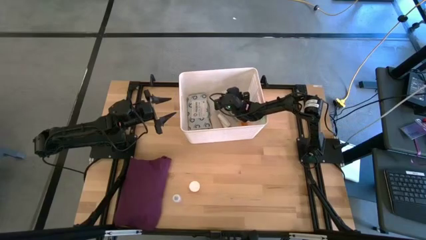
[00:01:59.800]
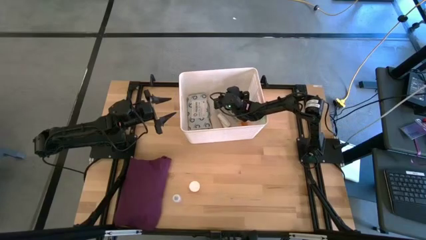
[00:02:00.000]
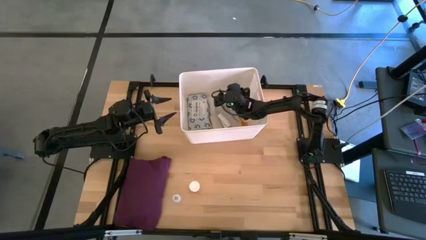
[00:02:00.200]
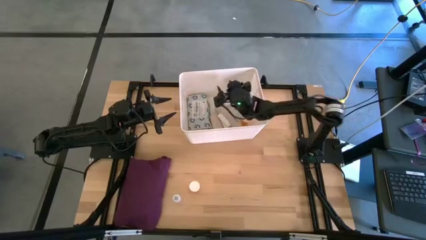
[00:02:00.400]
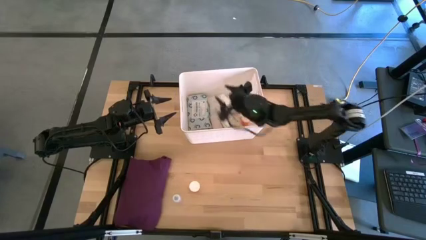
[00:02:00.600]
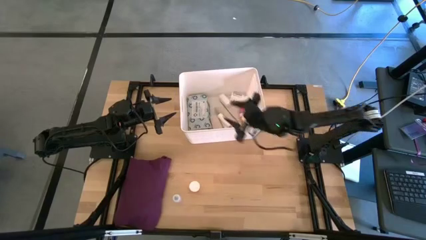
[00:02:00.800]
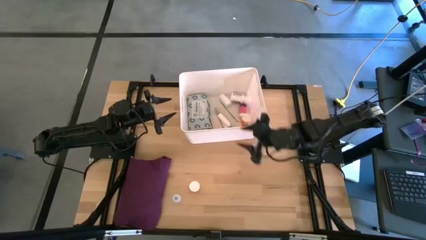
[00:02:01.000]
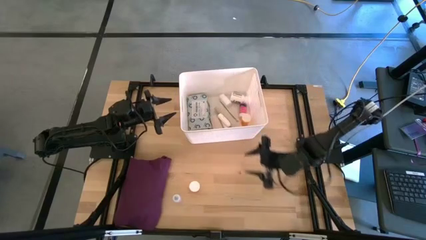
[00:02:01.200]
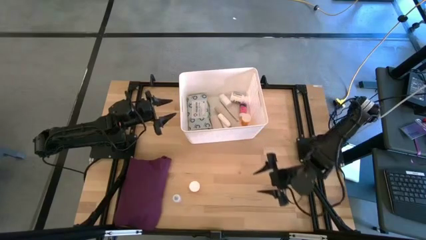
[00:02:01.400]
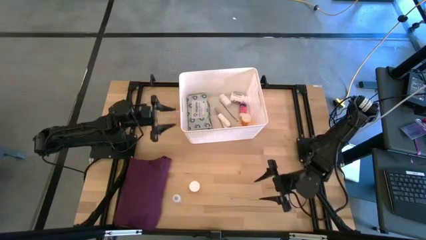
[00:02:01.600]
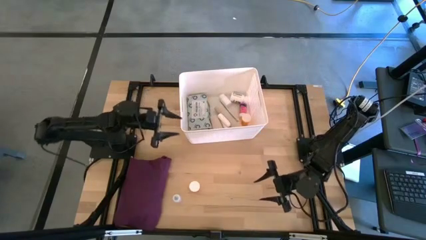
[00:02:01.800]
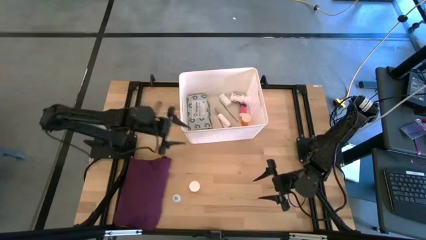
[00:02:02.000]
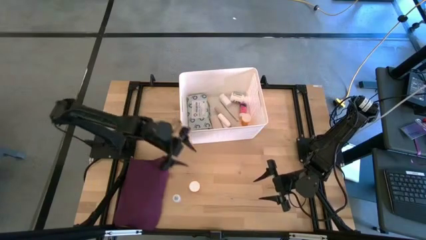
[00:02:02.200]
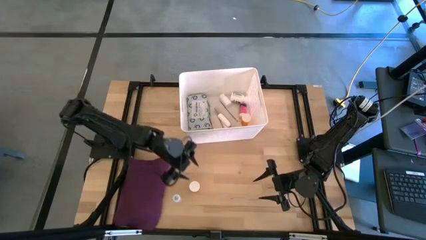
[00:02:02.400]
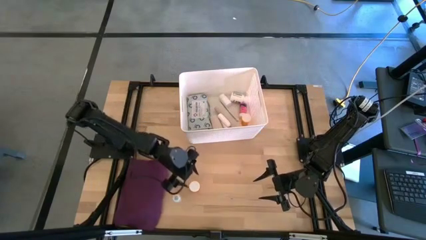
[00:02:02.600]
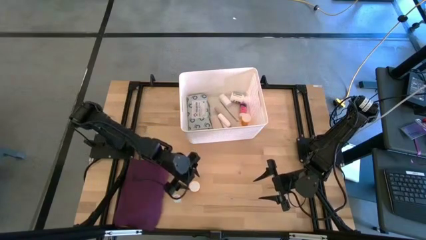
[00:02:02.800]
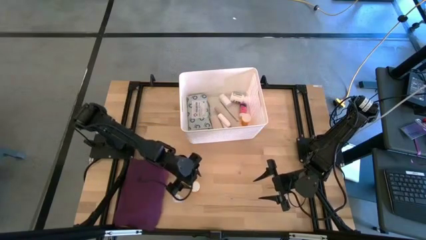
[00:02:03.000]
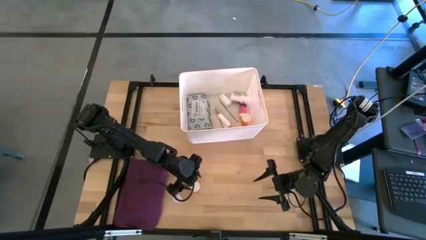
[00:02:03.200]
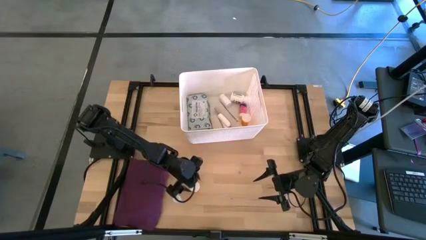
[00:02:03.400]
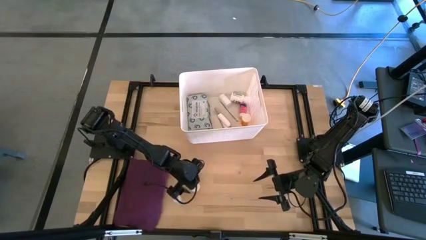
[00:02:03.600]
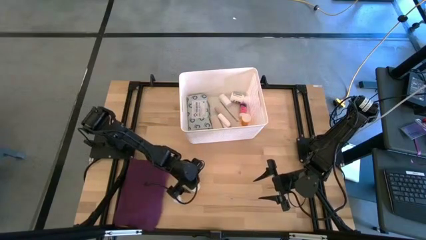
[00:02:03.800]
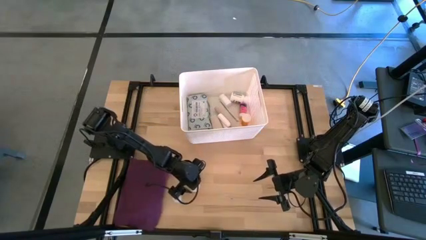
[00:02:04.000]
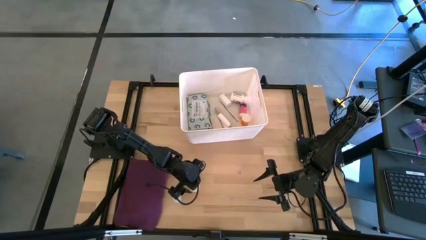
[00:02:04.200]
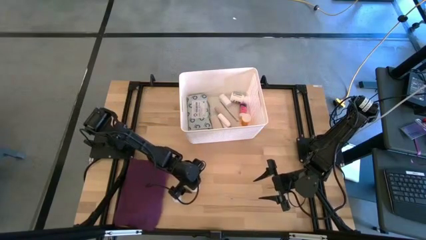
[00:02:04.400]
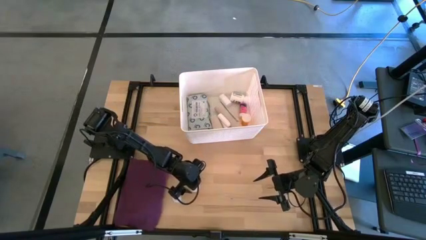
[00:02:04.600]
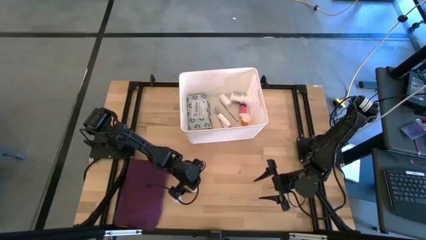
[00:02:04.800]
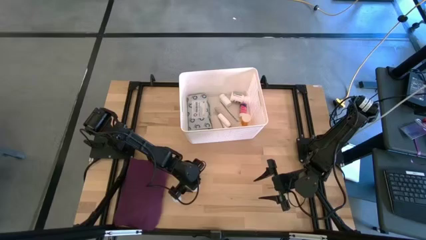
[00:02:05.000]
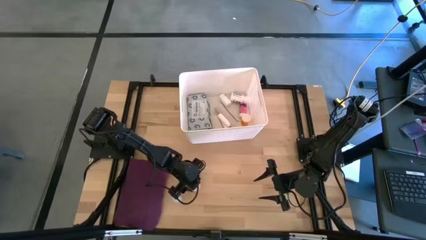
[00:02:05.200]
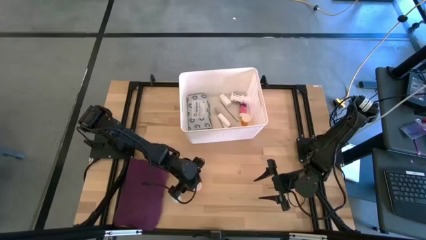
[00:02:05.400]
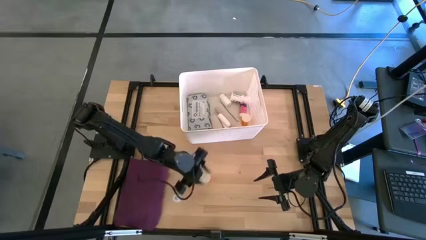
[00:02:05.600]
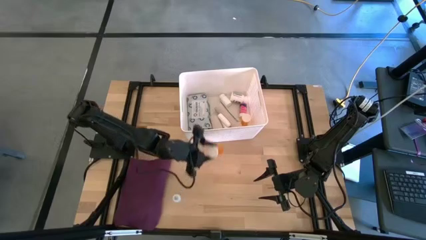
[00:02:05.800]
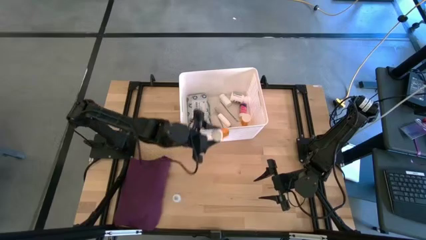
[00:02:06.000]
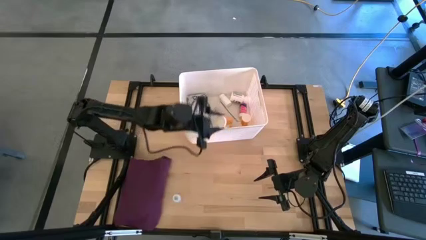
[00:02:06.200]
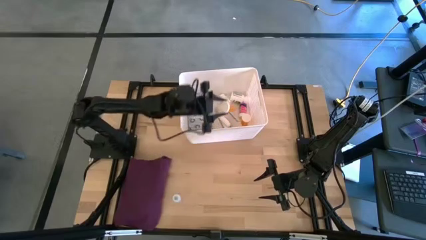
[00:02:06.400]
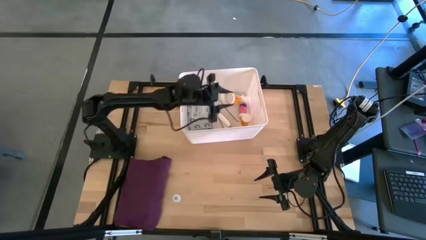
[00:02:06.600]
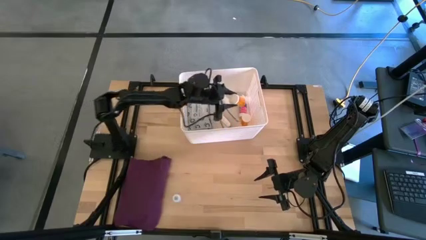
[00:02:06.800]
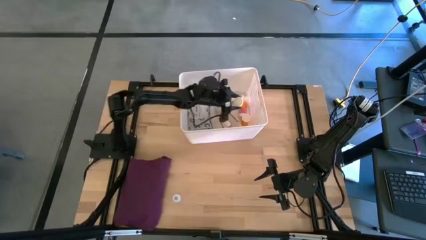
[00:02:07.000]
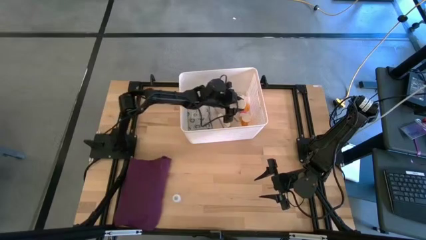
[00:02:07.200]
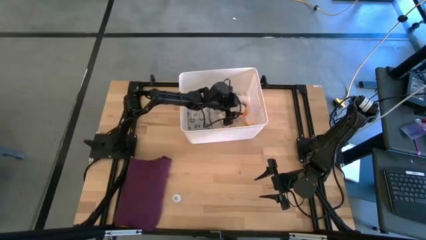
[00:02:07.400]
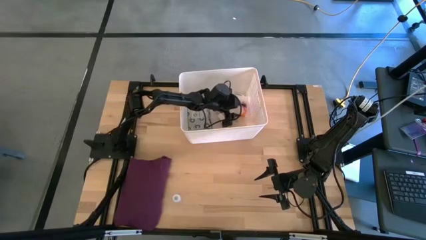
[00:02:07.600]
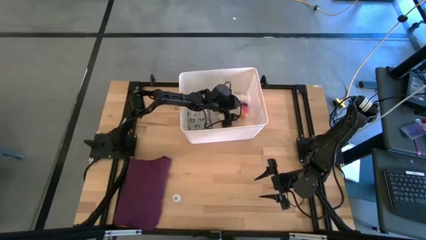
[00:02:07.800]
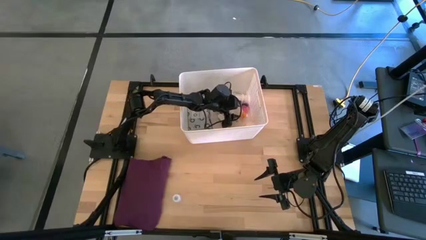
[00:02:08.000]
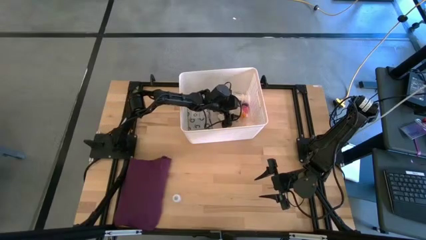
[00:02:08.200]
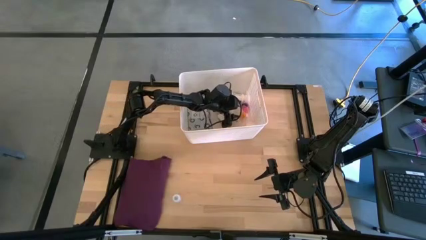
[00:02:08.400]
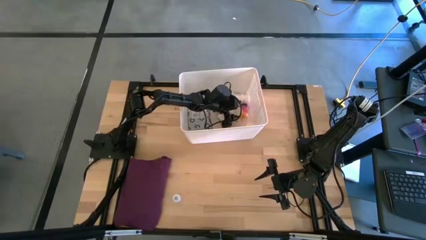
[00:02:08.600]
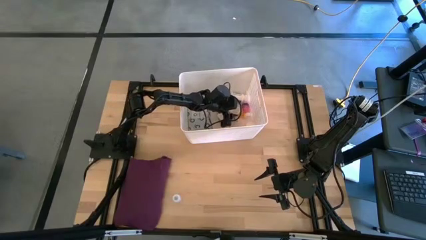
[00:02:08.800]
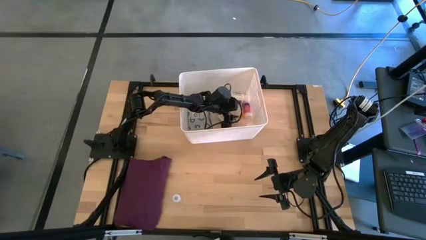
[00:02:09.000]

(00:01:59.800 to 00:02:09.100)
Task: Pick & place medical supplies in basket/bin
Put the yellow pill bottle into the white bin

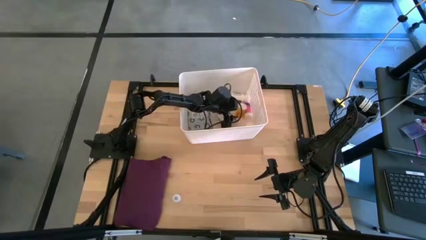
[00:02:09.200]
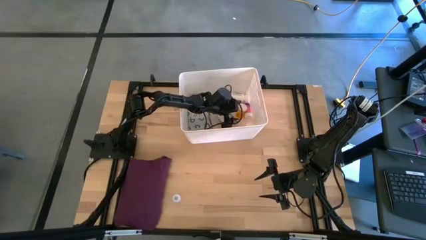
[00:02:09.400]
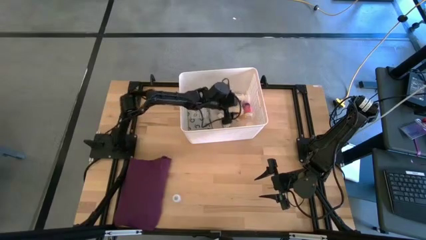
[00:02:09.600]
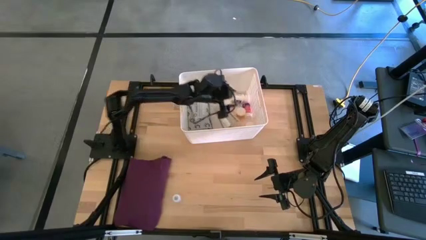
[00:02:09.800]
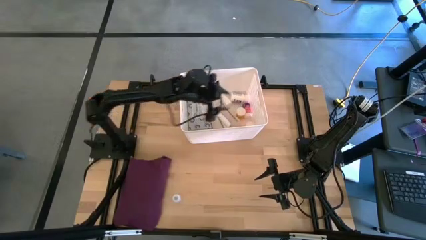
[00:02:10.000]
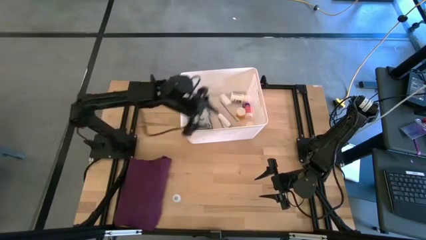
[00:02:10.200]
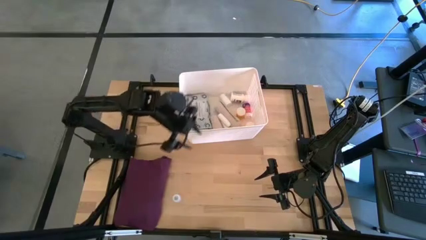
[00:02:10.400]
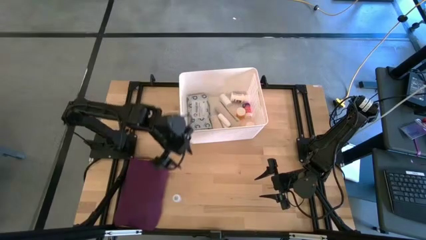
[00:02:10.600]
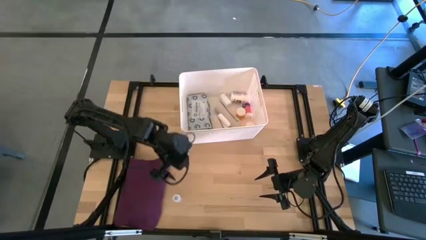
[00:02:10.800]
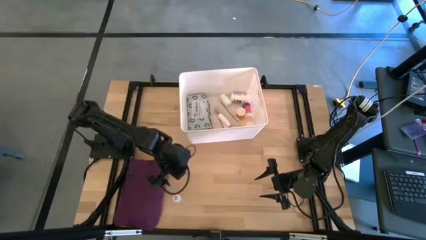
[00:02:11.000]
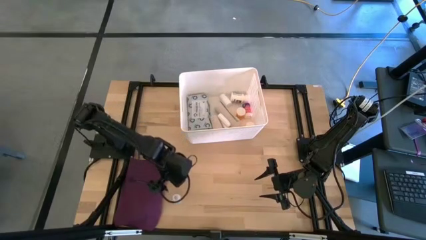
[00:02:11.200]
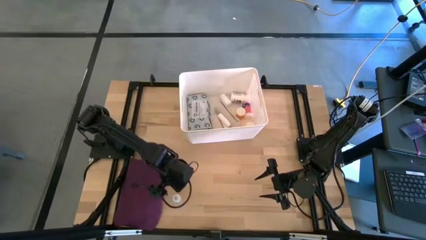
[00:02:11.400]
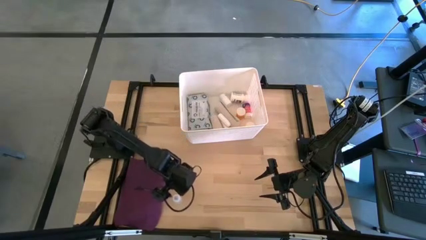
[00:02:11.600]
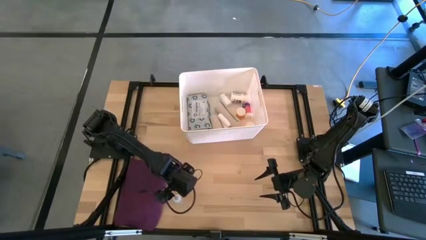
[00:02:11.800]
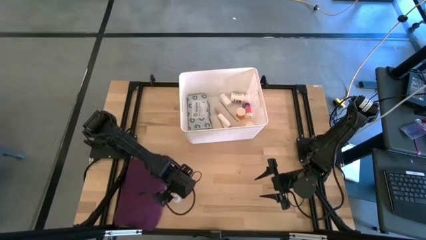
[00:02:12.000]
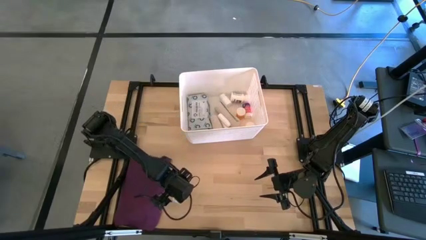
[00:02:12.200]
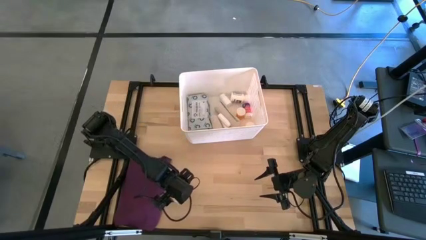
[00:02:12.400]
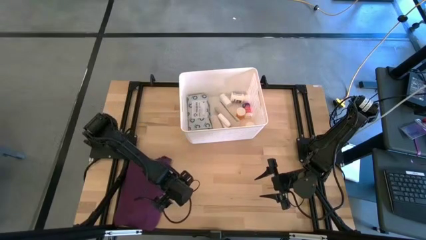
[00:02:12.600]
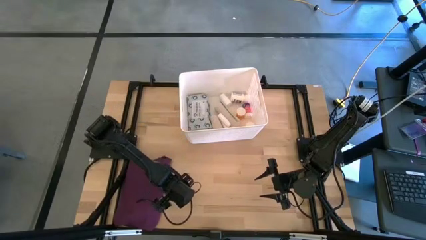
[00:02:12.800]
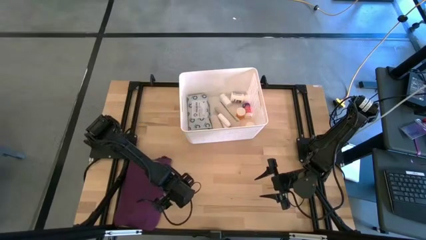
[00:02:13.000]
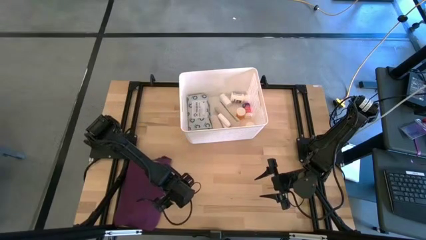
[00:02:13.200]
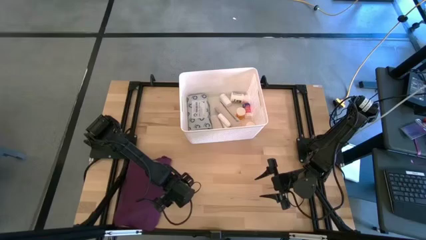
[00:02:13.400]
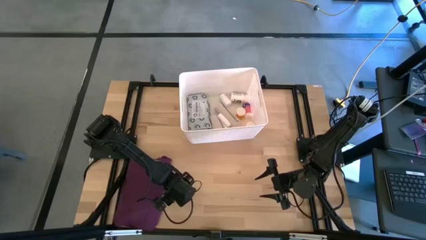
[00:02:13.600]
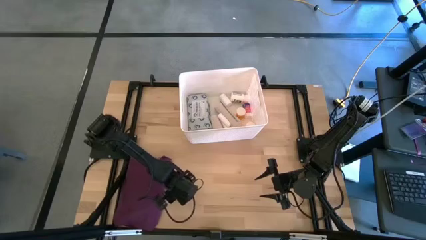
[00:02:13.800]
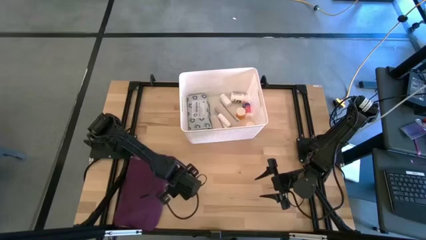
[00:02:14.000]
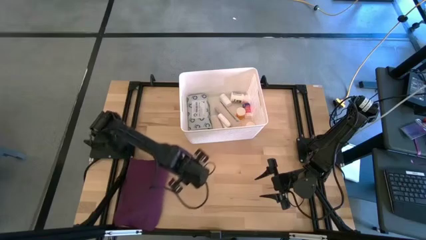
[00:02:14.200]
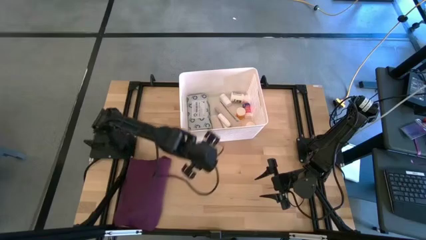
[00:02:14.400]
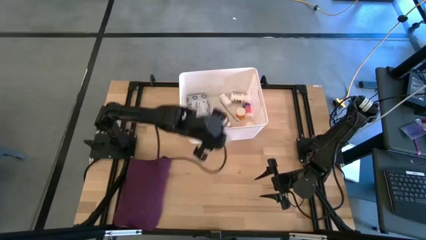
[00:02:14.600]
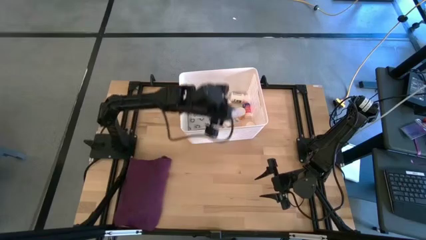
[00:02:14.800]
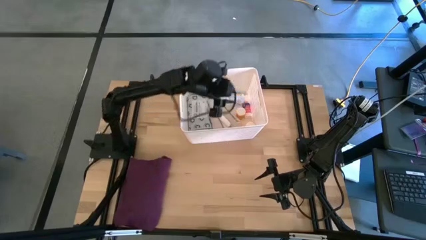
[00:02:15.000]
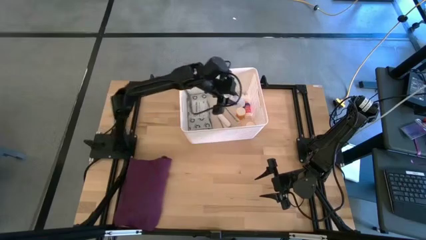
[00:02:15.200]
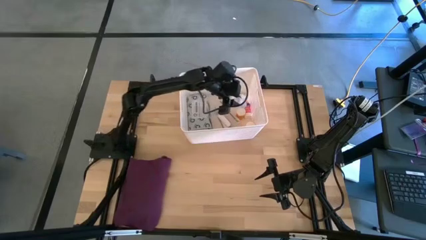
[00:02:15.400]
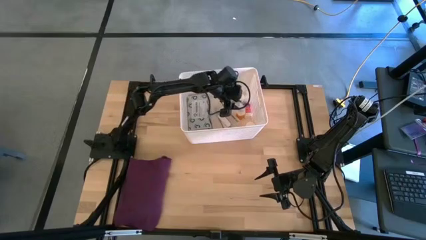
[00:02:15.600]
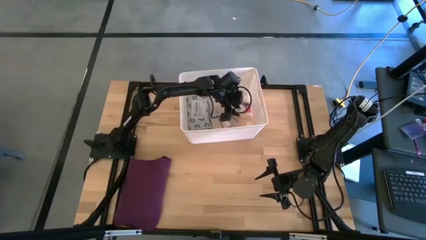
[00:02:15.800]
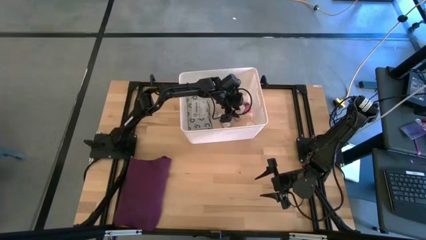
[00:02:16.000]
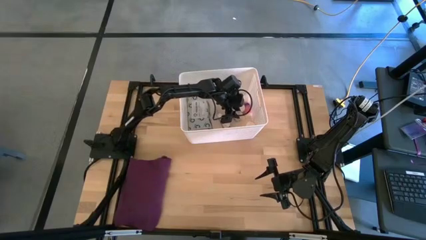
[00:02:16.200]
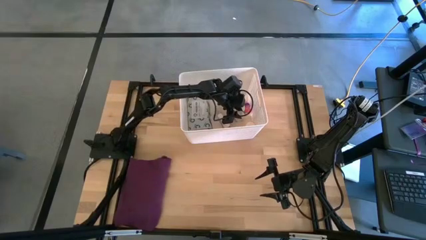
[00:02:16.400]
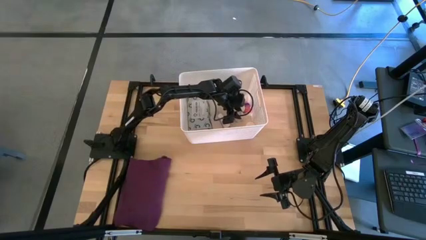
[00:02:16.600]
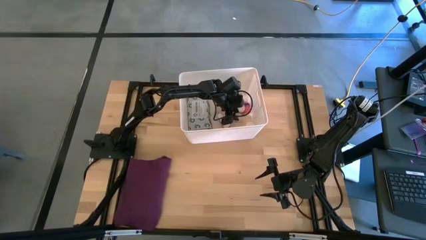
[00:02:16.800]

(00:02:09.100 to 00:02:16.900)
Put the transparent pill bottle into the white bin
